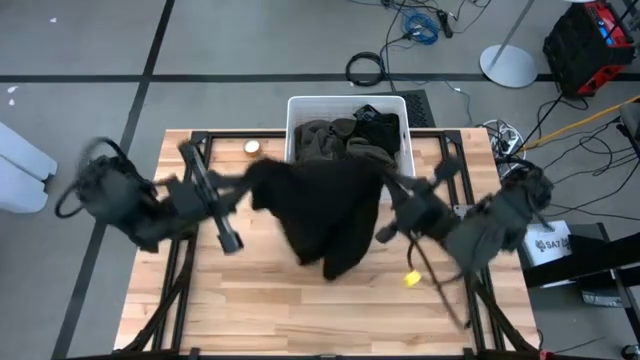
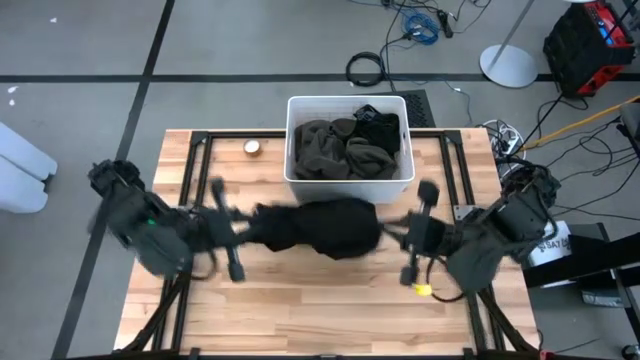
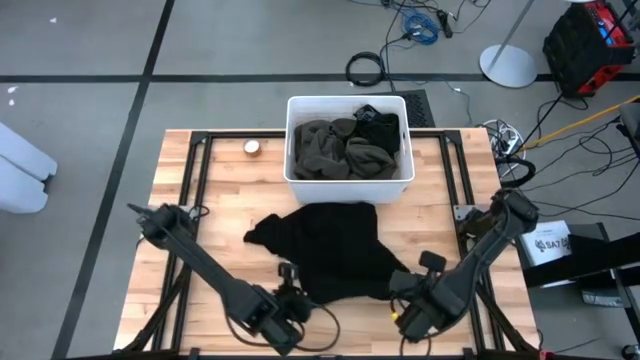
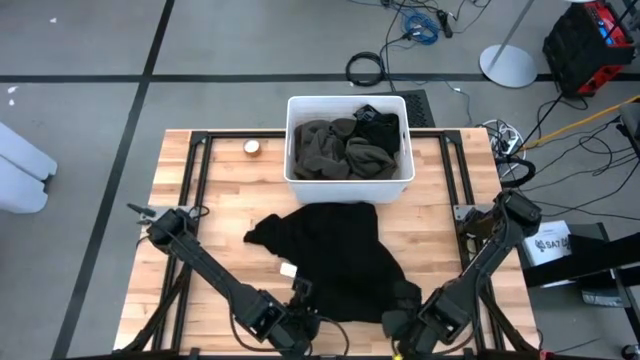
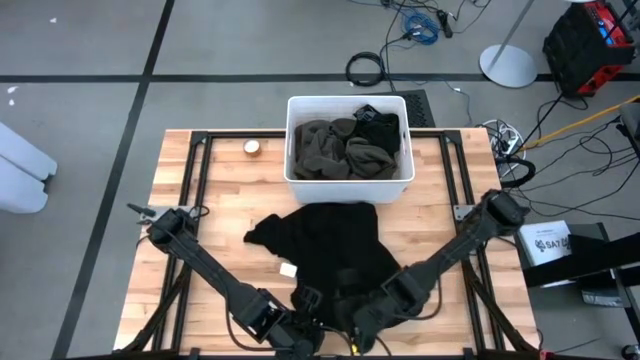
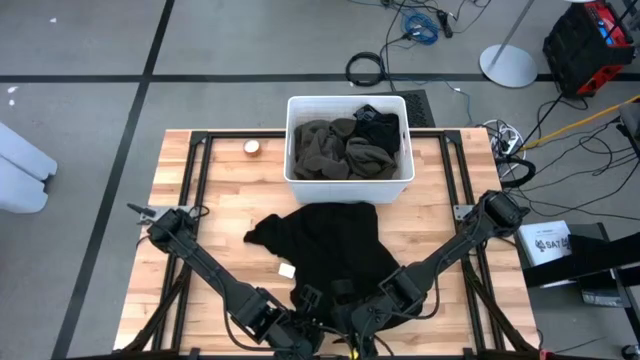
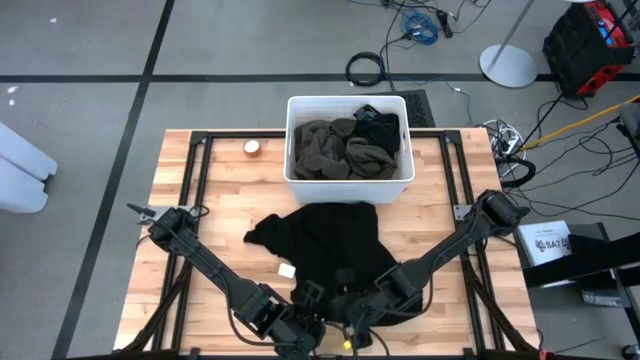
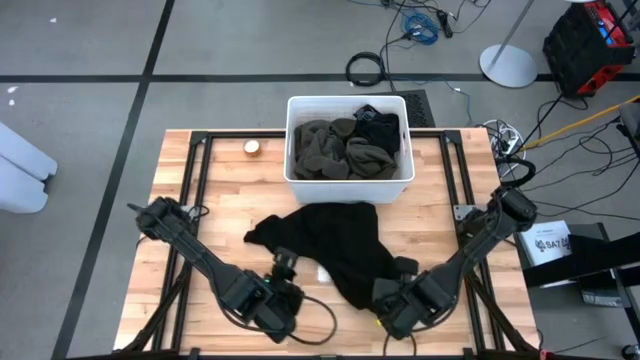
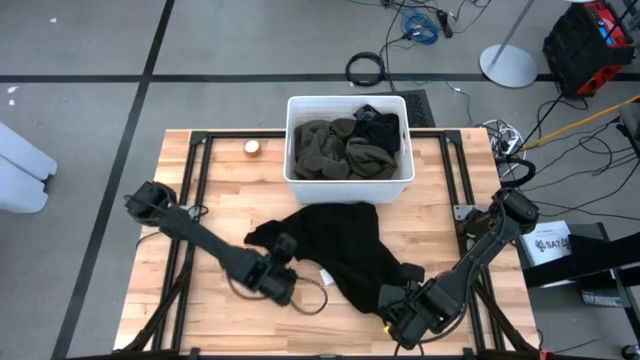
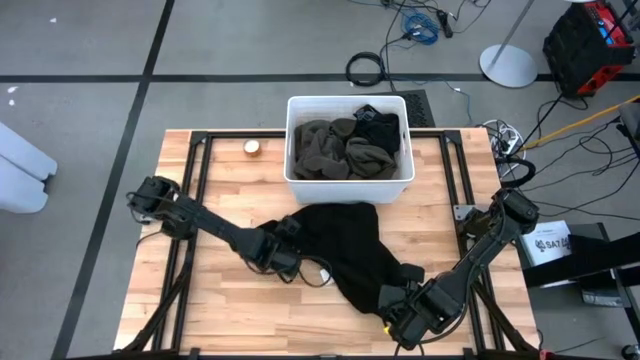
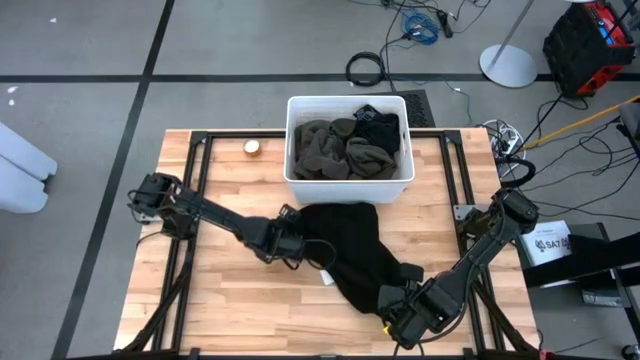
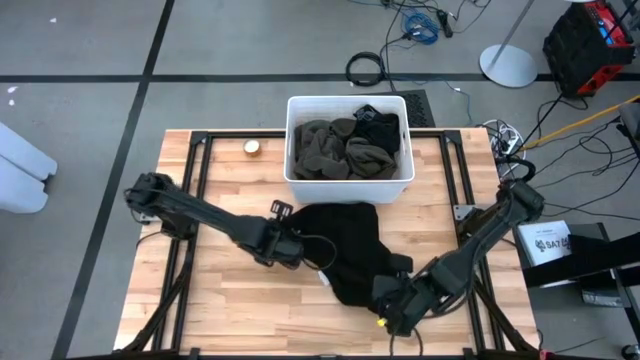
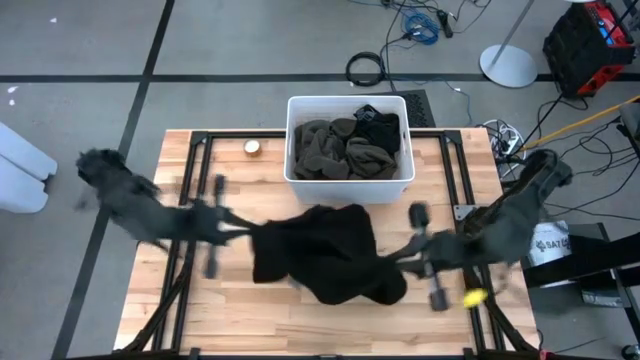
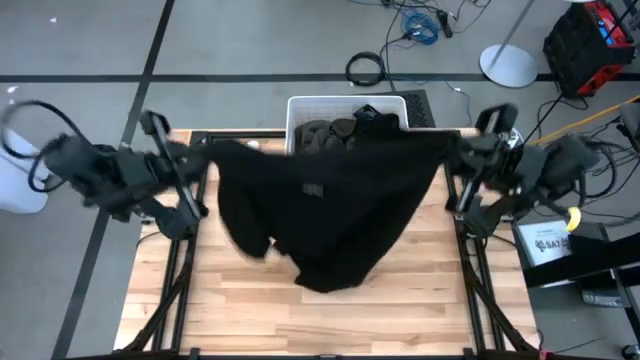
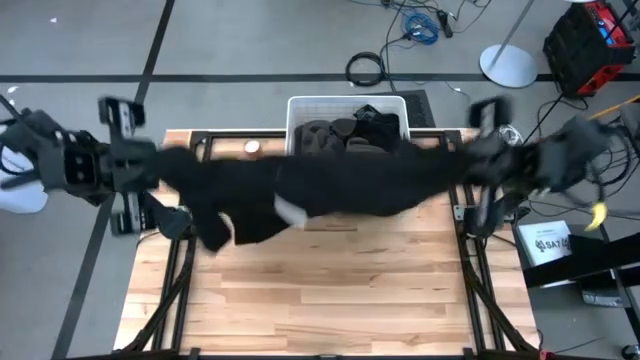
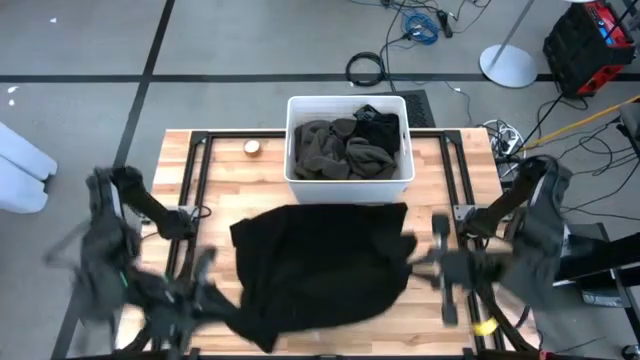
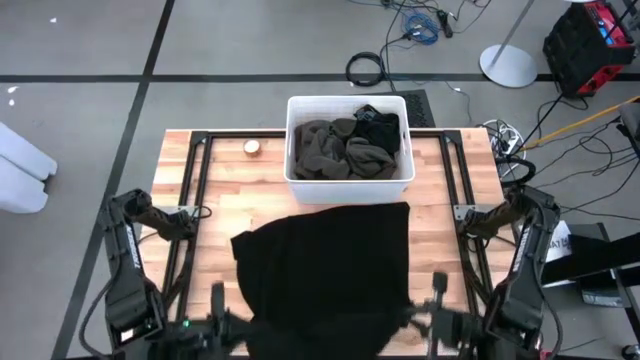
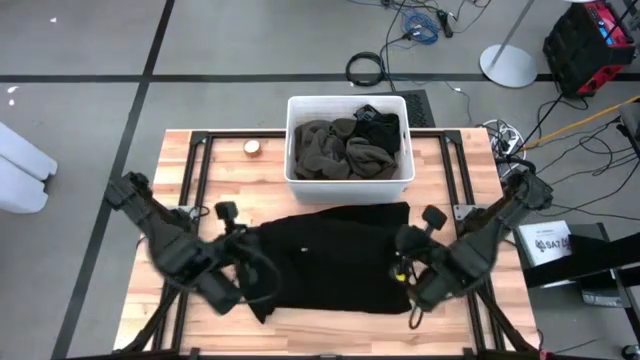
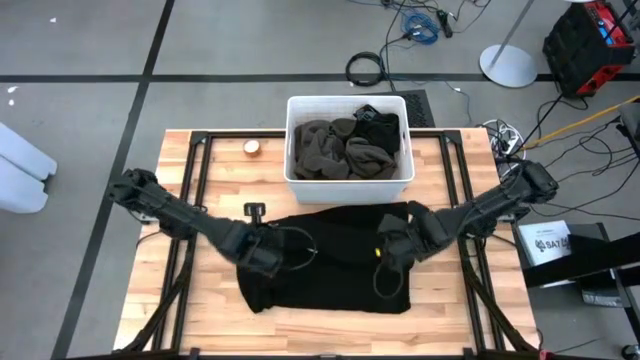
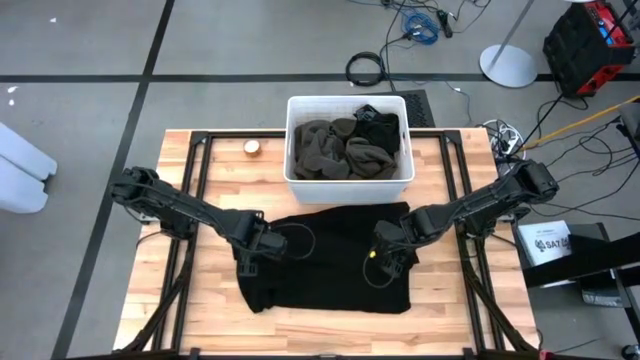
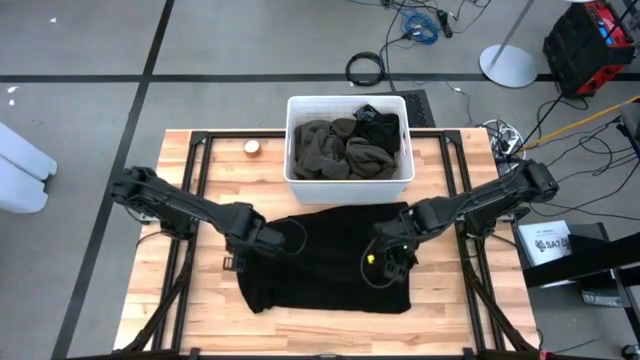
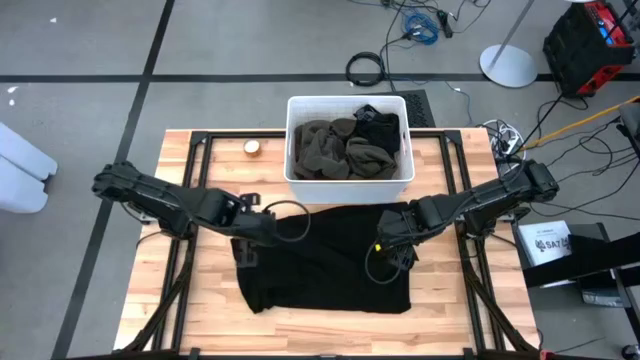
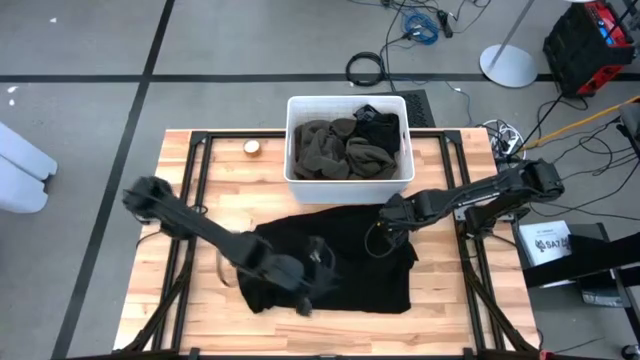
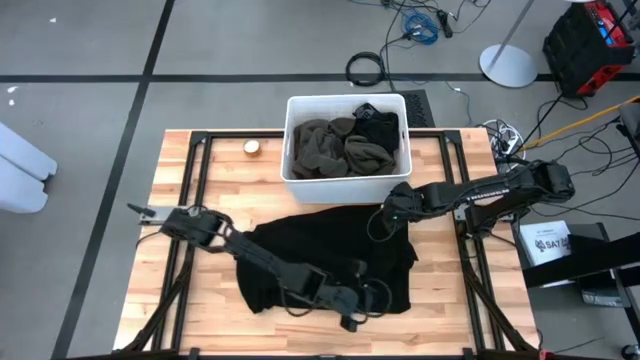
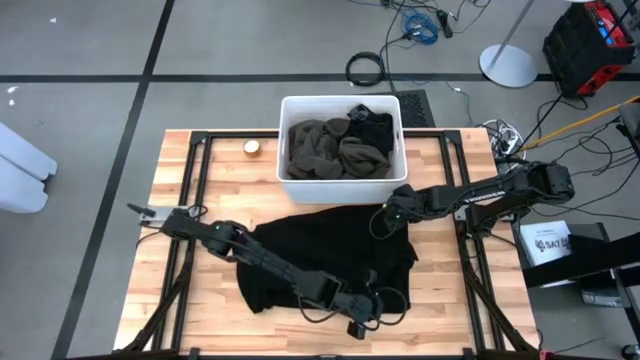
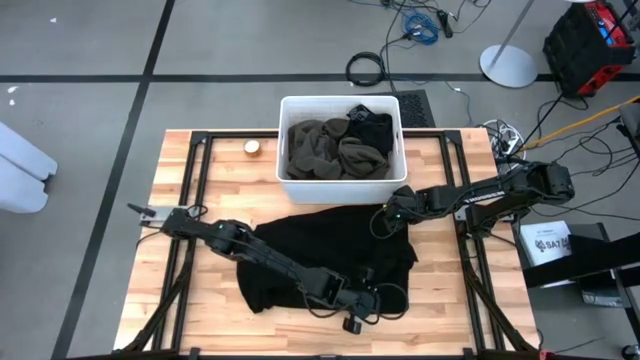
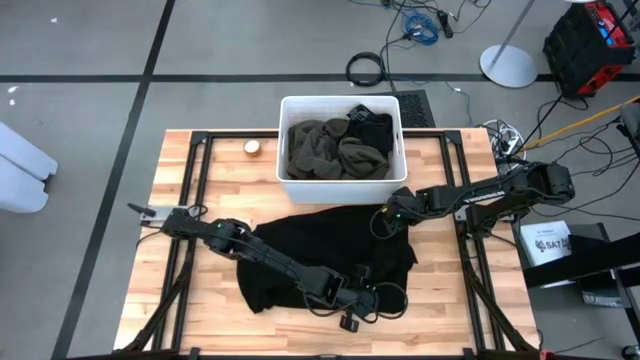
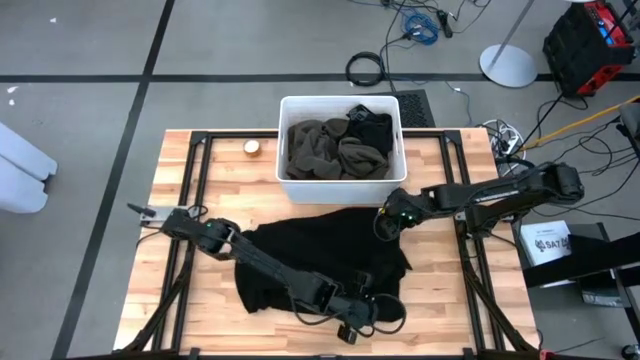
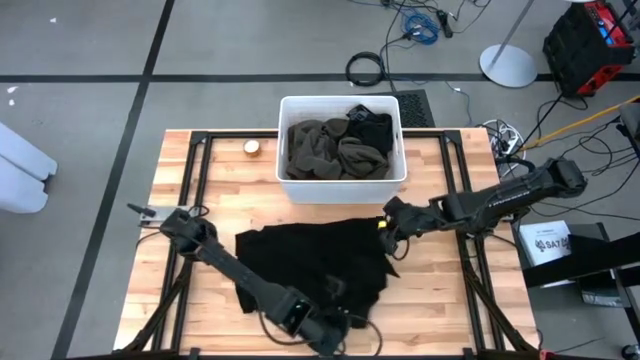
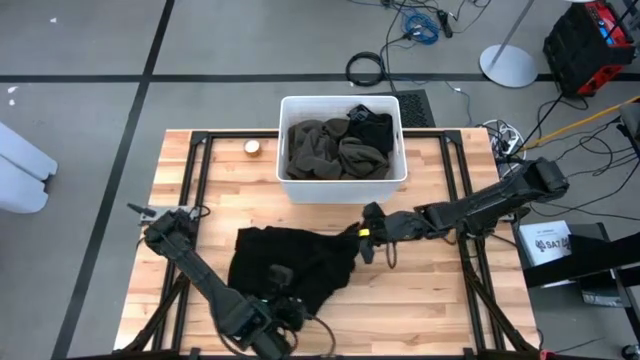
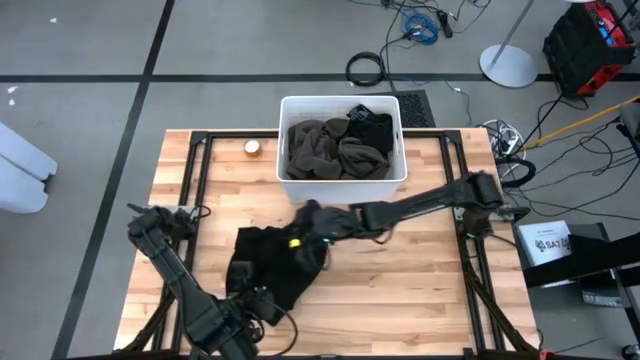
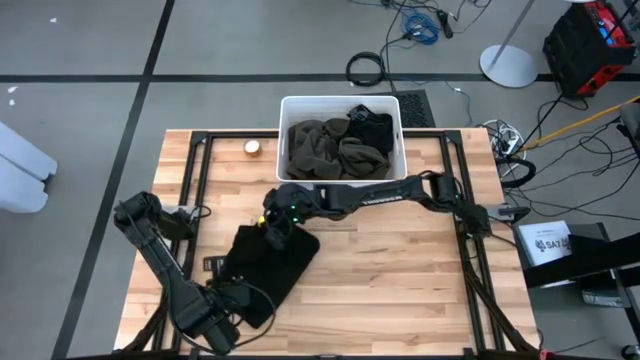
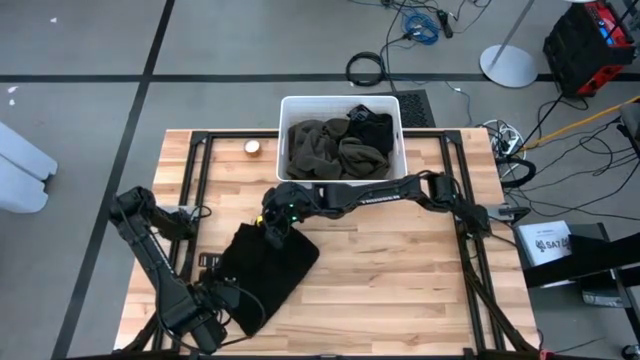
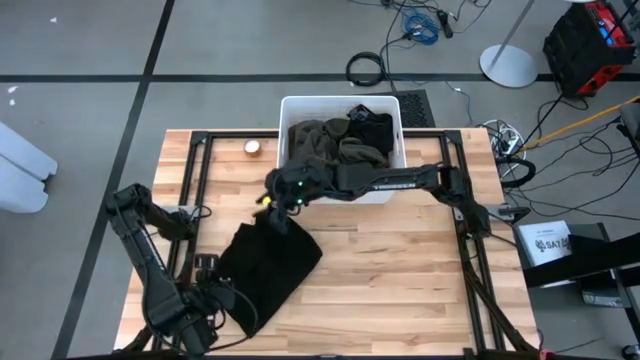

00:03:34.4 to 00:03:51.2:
Task: Fold laundry
Fold the black shirt

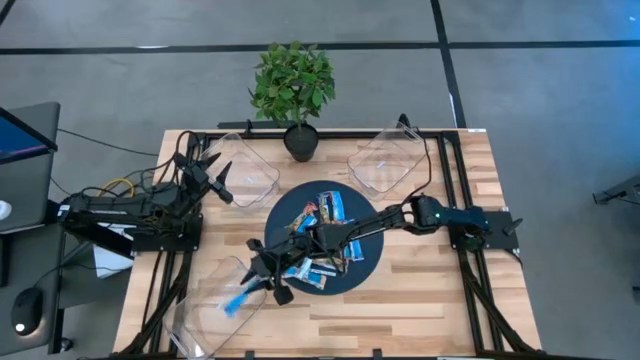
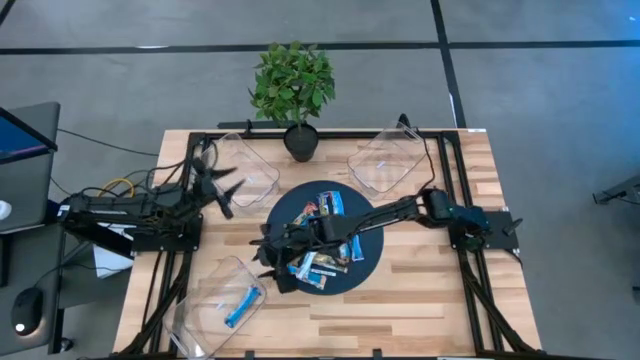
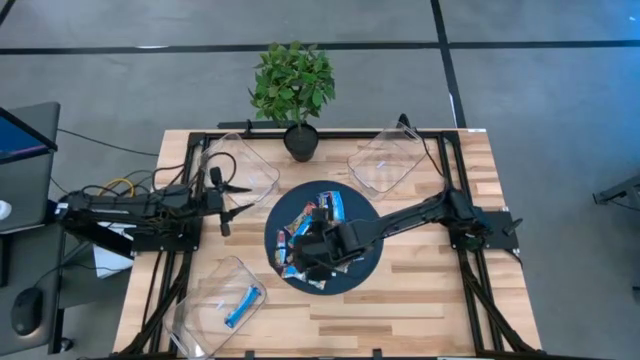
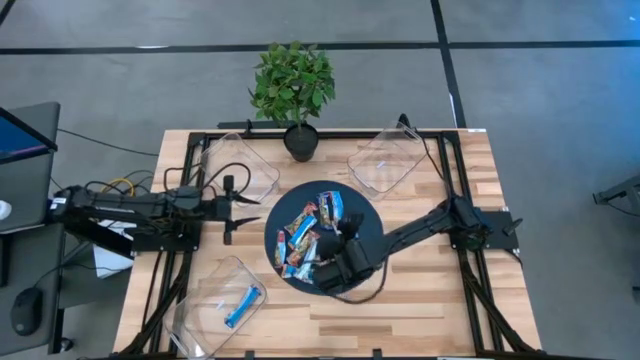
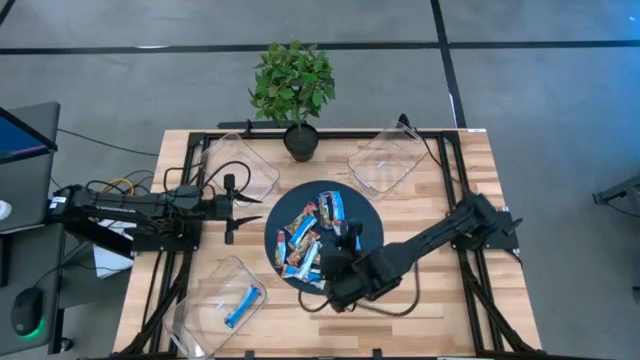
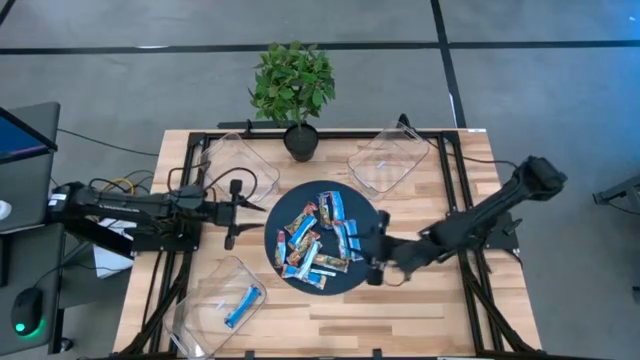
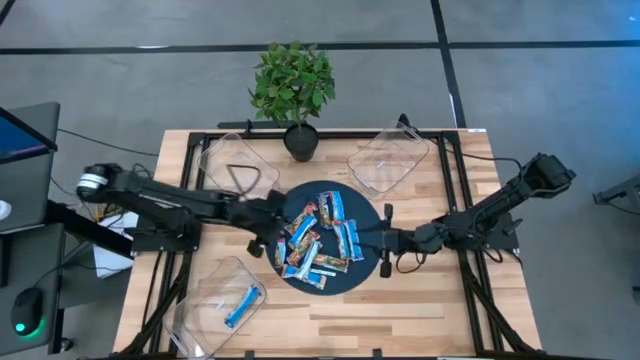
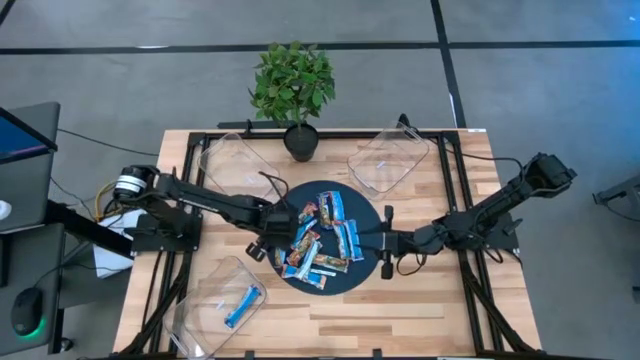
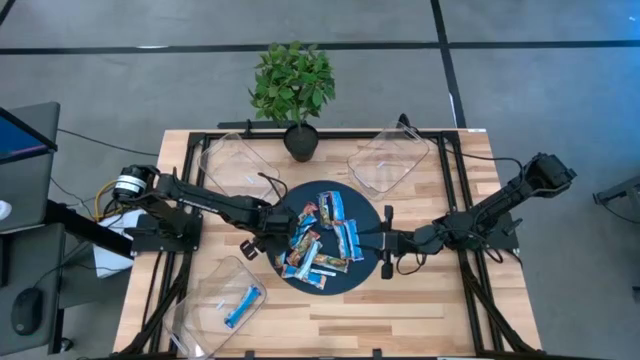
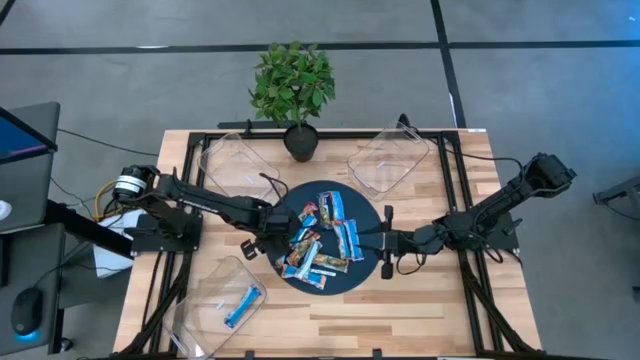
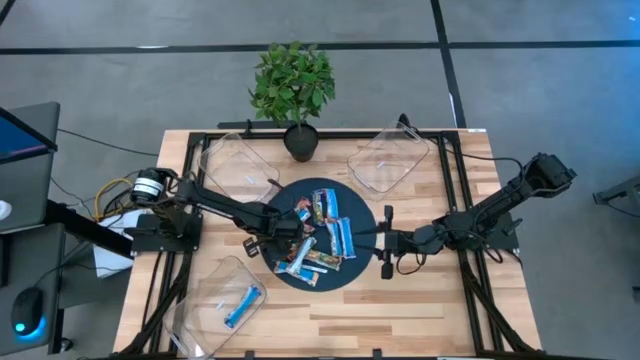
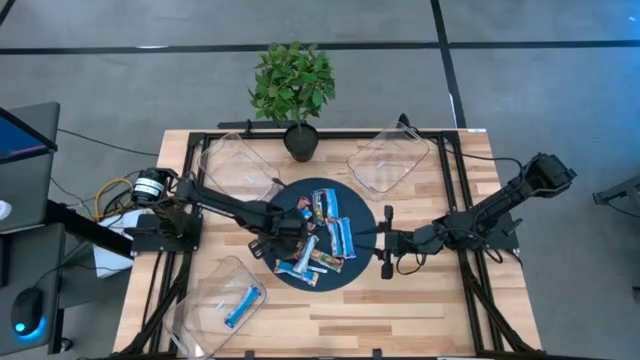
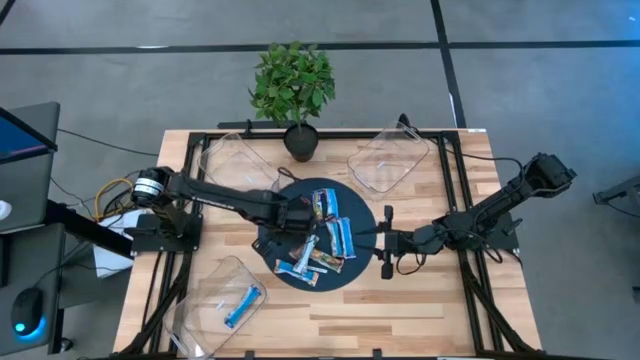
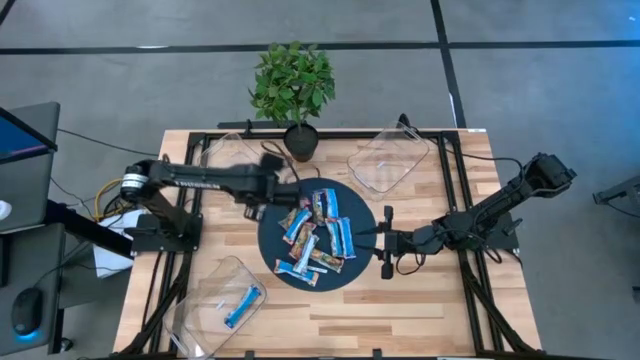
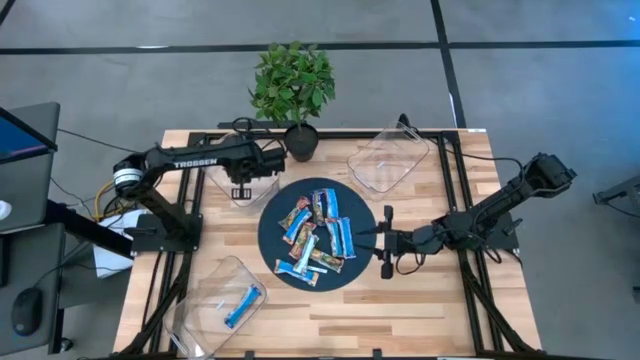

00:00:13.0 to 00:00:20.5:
Task: Pick and place Granola Bars by type
Put the red granola bar into the top left bin
